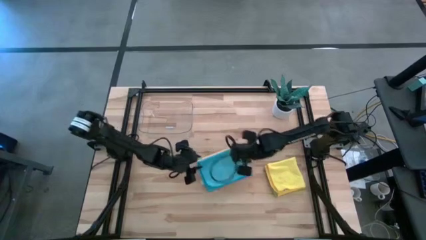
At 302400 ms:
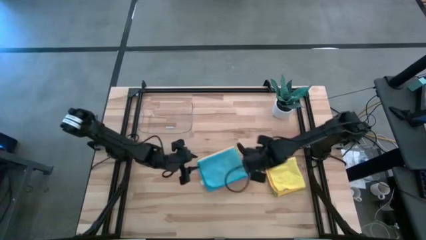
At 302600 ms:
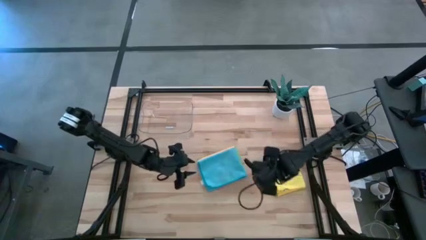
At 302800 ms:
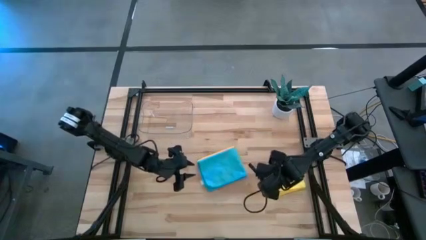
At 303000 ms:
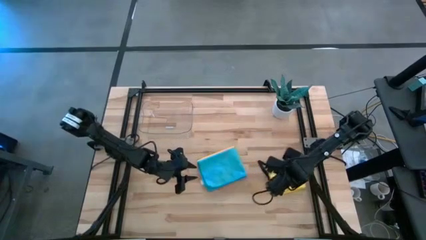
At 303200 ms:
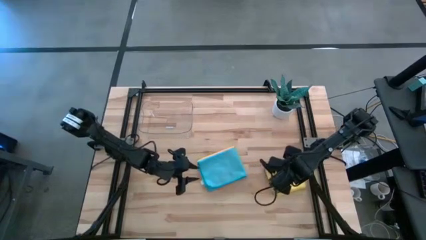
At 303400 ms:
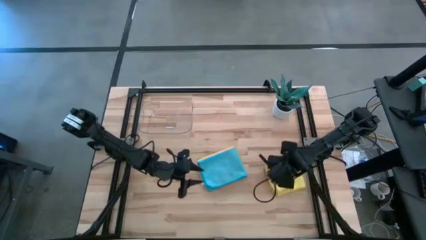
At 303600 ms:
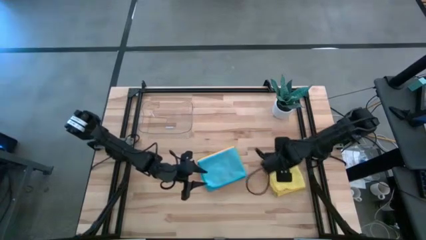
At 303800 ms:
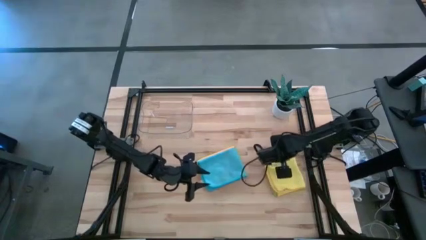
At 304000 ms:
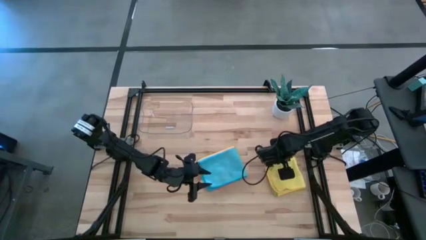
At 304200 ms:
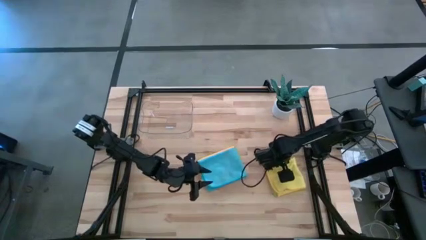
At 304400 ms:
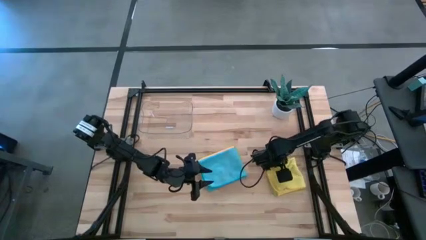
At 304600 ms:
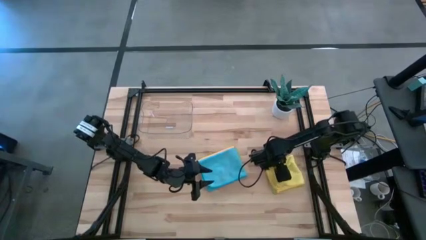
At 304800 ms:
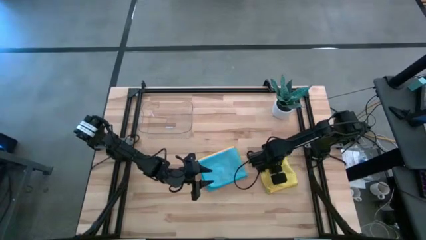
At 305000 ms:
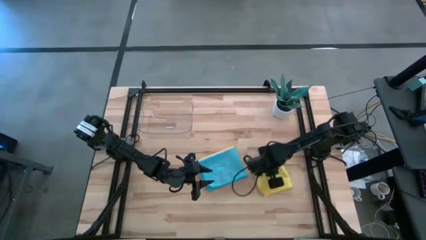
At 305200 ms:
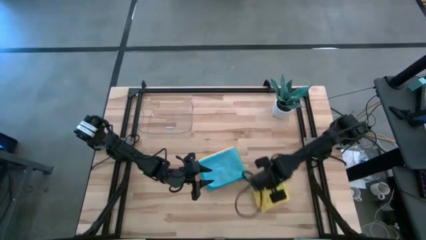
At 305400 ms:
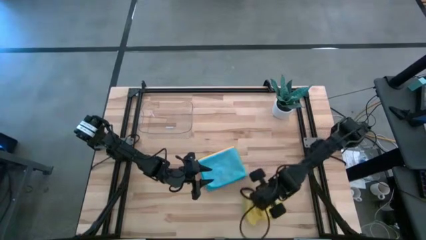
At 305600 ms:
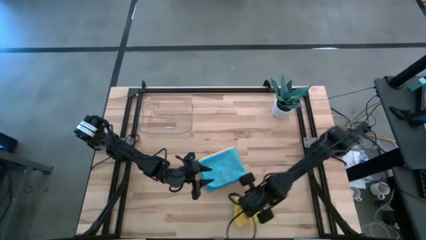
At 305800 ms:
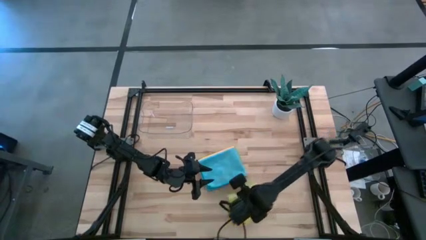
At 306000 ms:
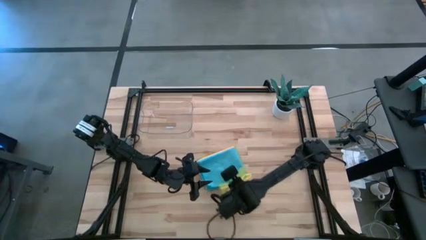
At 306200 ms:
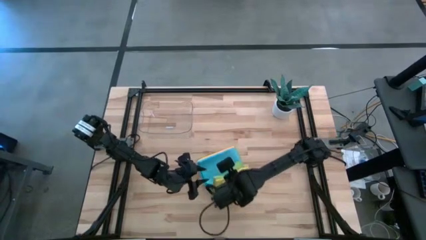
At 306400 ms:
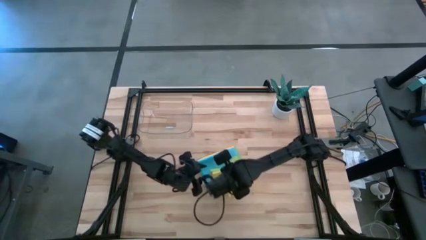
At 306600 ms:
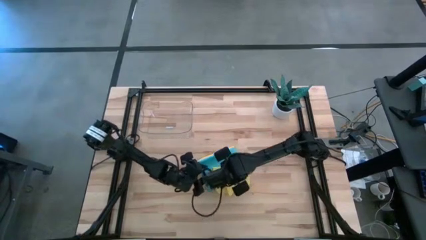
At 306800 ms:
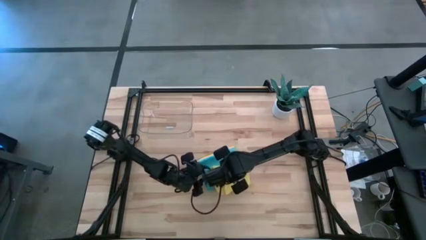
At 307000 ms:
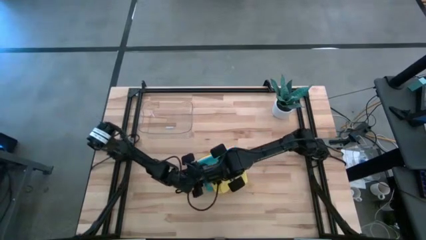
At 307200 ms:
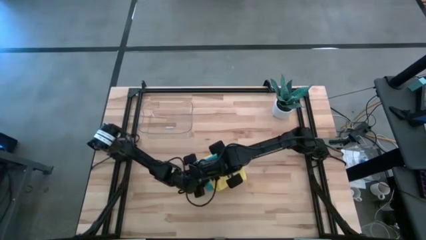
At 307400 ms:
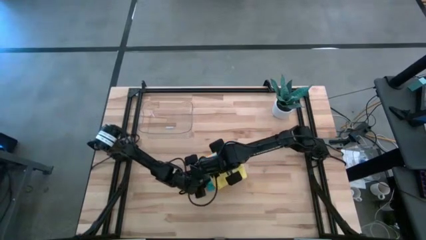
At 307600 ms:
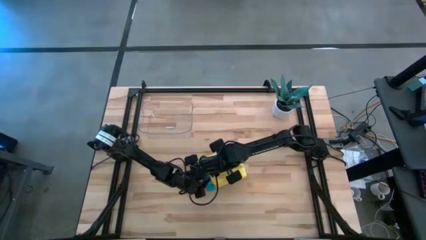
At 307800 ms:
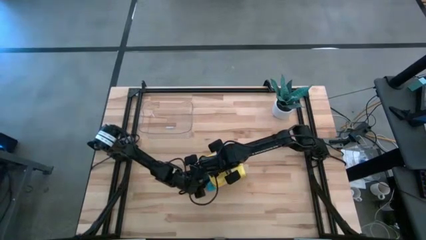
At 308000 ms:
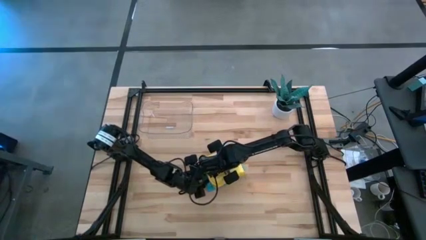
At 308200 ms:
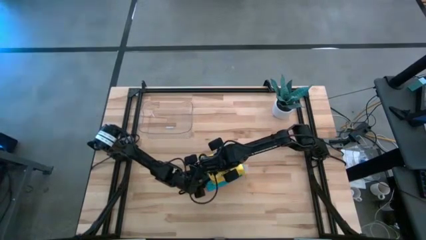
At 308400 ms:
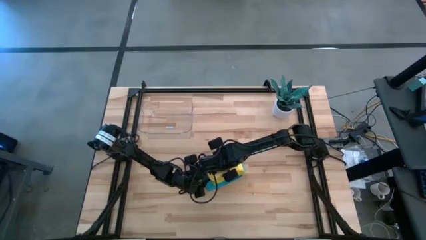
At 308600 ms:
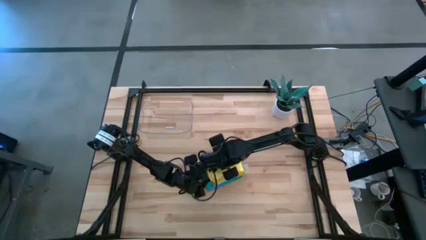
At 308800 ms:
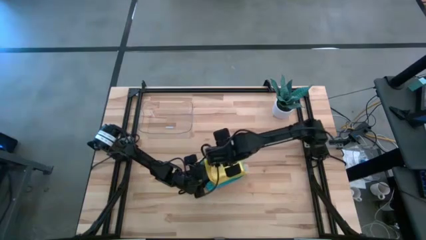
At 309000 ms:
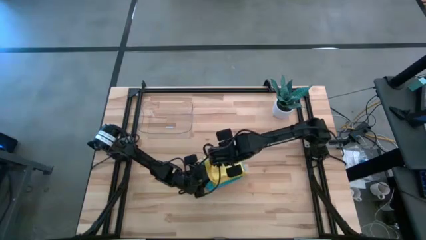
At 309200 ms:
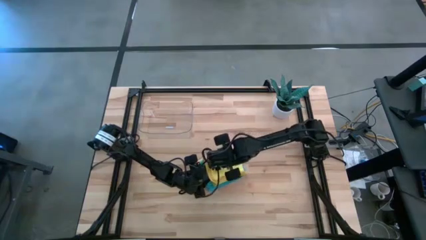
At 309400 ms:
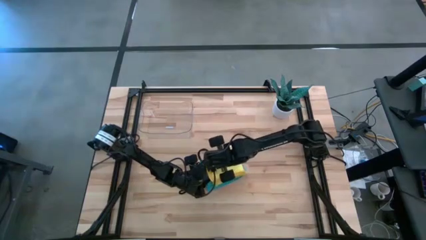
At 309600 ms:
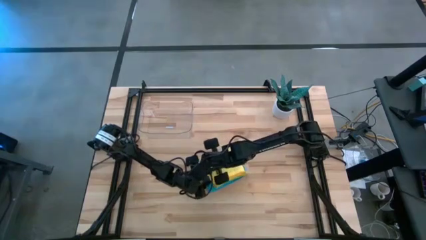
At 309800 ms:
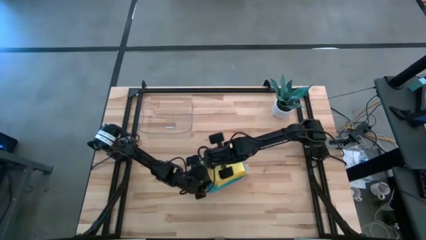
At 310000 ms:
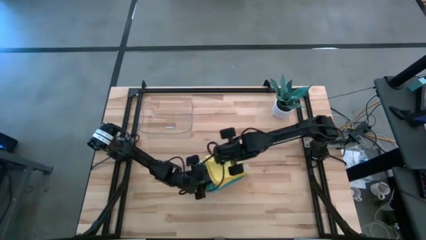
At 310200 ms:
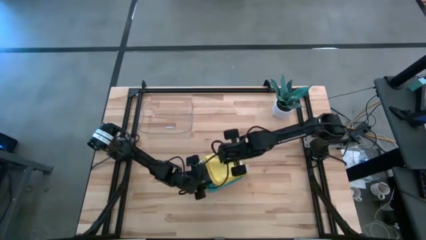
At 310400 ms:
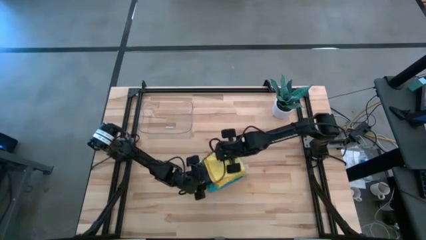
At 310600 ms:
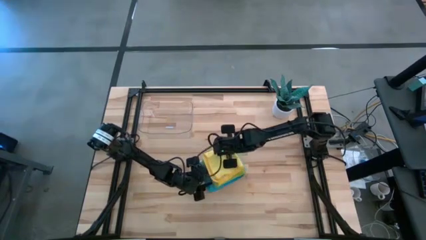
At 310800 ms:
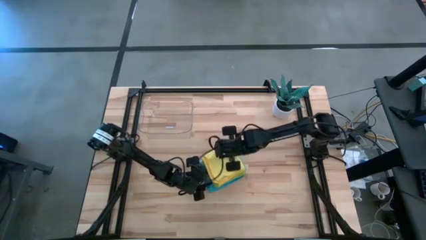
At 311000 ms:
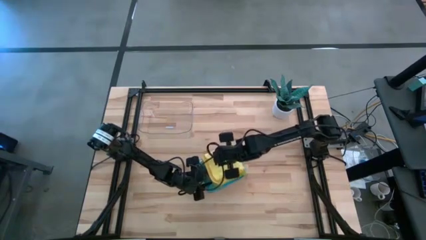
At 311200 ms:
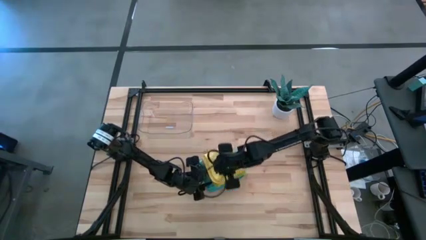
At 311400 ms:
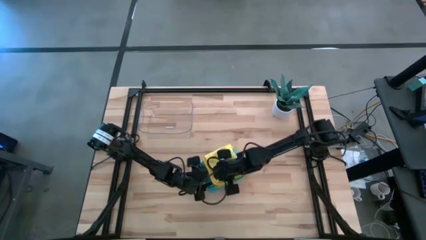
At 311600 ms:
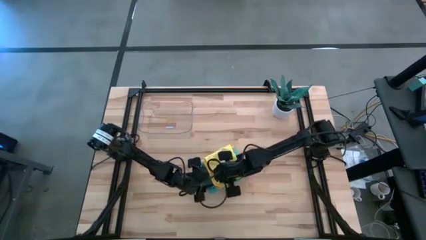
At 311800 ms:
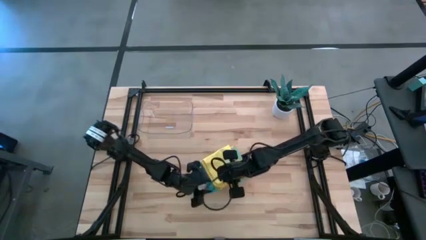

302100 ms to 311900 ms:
Task: Fold microfiber towels
Stack the right stacked microfiber cloths on top of the blue microfiber cloth

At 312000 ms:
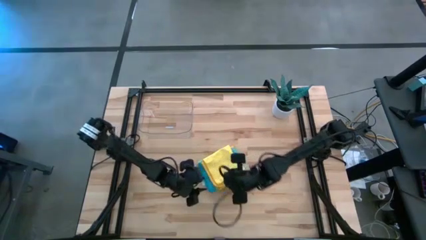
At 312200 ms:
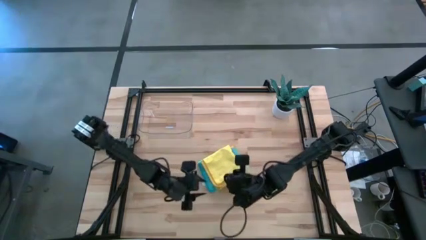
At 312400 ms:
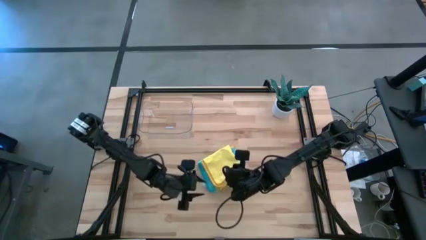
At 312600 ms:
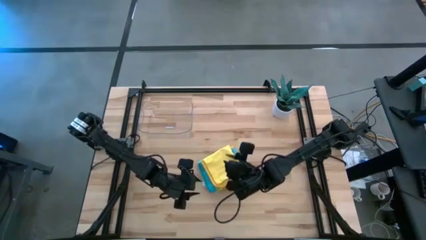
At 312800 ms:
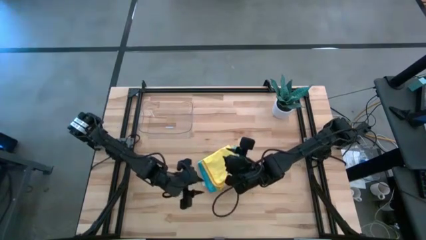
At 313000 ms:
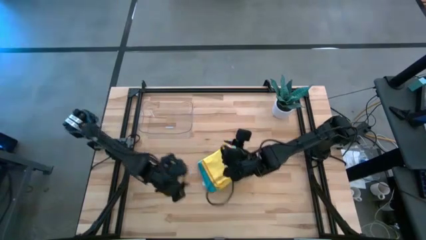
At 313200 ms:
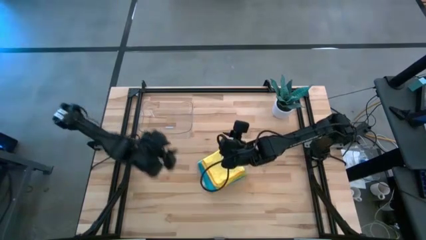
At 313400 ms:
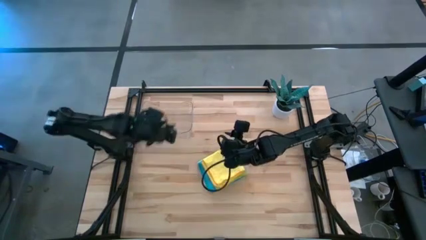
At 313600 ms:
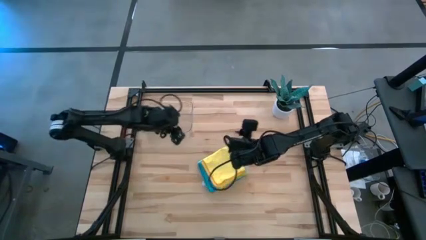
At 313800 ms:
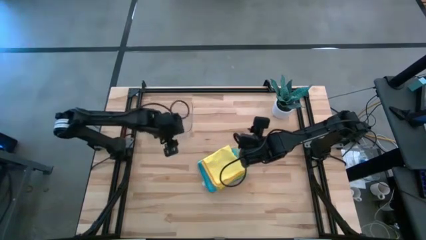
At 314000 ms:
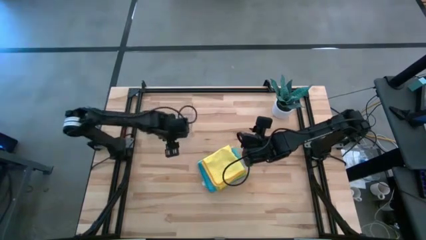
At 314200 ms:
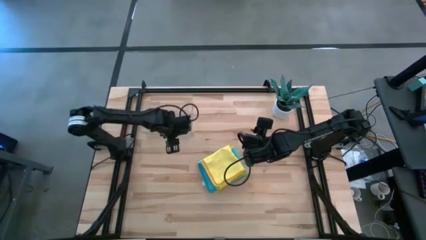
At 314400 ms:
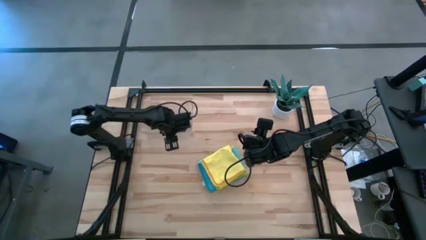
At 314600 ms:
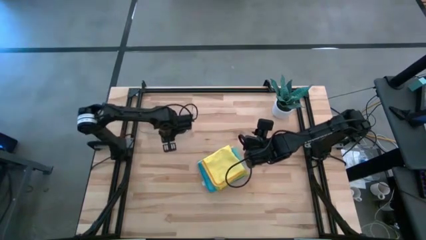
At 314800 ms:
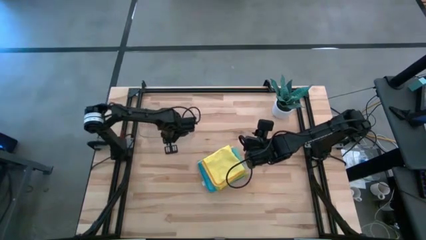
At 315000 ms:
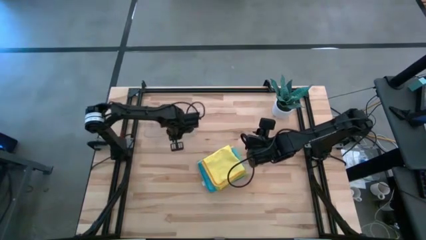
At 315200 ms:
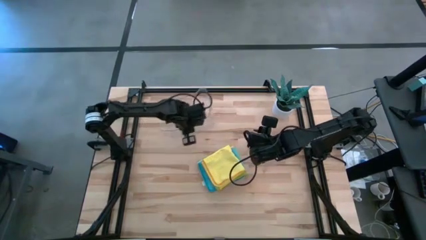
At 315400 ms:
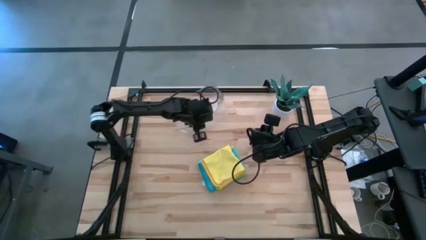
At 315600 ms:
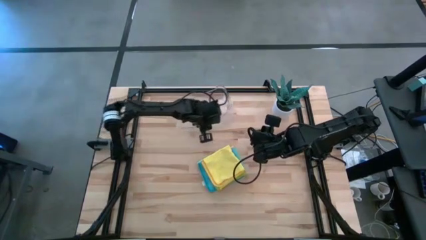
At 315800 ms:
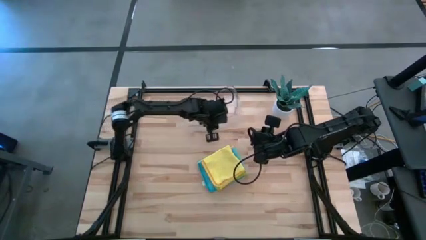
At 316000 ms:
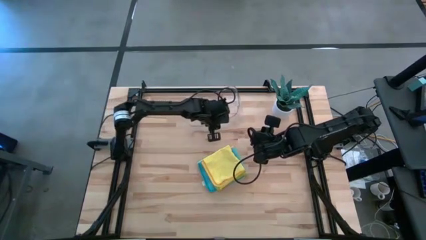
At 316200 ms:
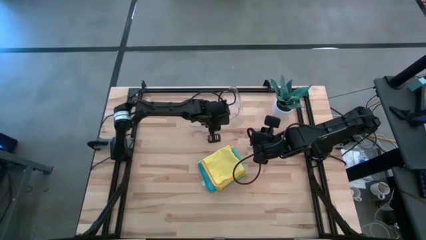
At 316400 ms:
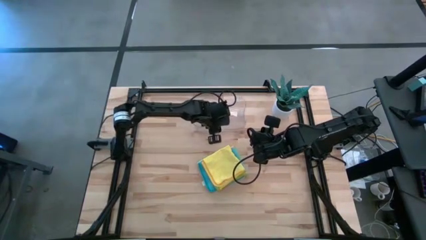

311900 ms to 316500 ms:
Move the transparent bin to the top center of the table

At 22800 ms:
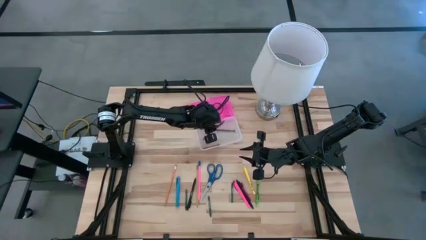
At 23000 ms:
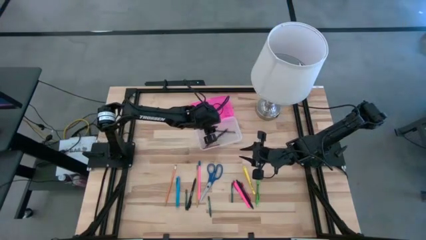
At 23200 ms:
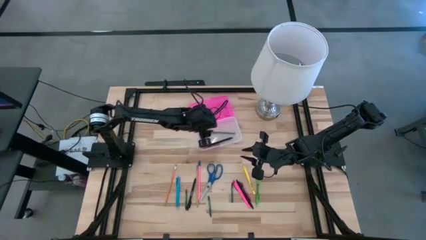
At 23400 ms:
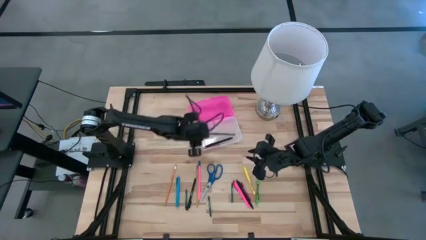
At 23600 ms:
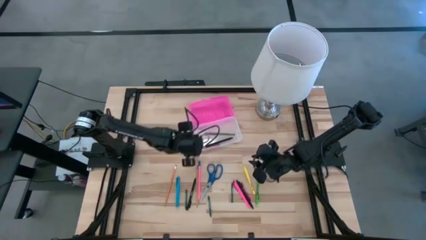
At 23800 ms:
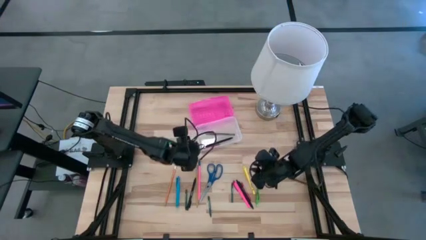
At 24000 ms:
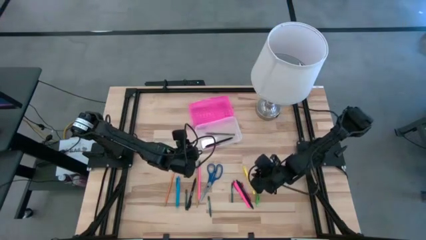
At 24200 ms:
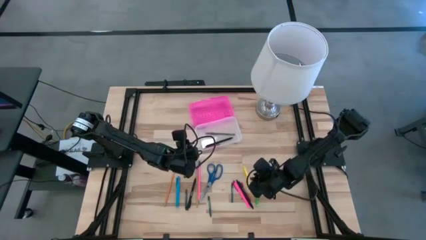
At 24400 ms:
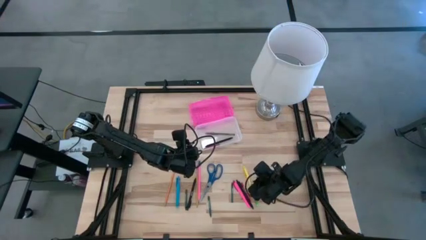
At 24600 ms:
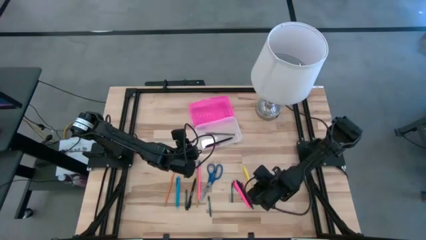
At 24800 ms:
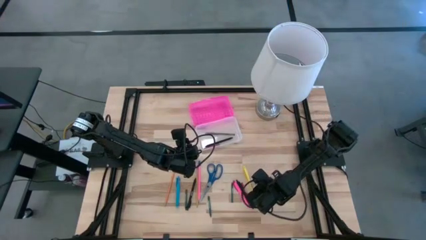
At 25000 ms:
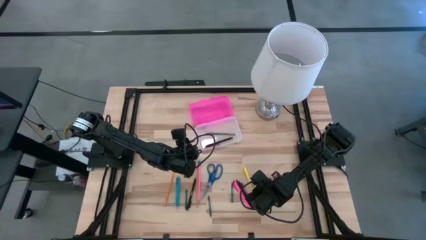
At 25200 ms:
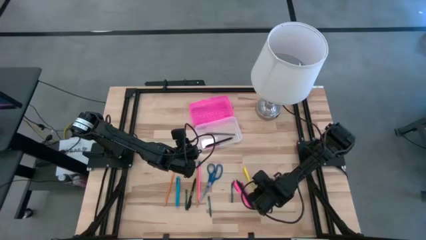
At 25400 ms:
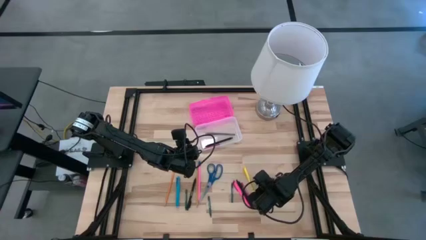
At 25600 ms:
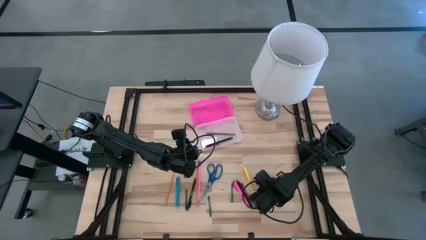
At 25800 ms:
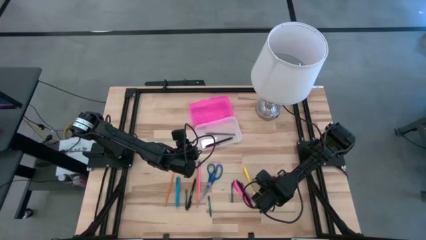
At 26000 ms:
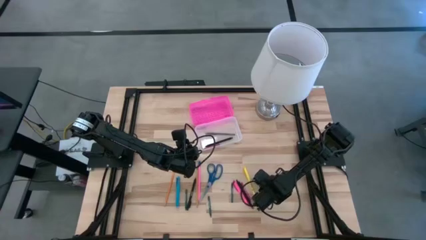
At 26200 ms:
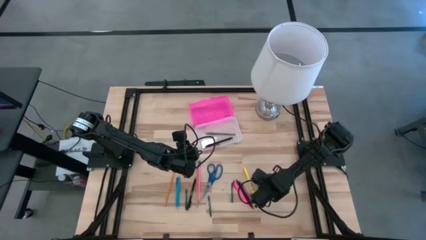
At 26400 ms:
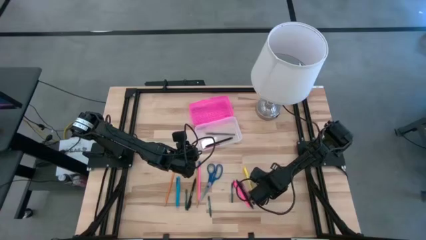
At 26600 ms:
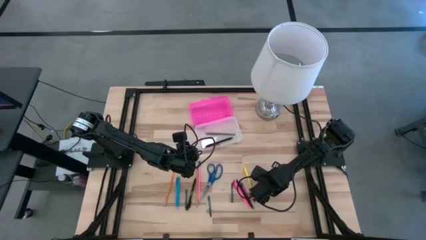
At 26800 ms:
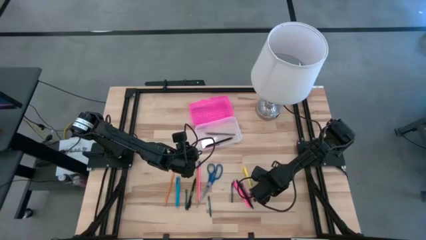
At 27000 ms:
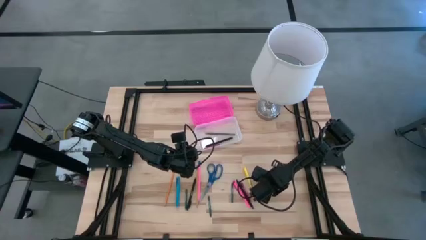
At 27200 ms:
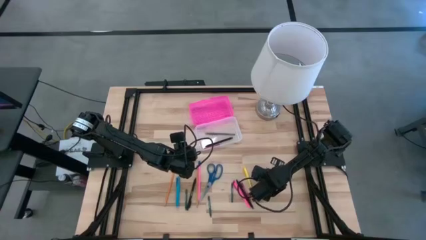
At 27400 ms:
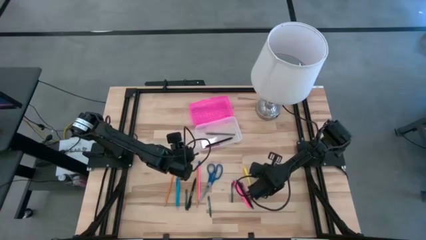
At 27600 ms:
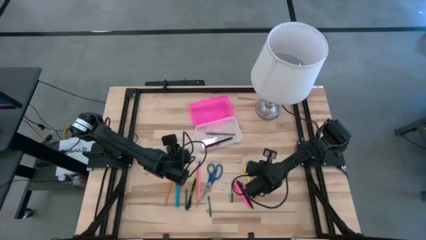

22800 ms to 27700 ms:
Task: Pick & place school supplies into a supply box
Put the green pen into the pink supply box
